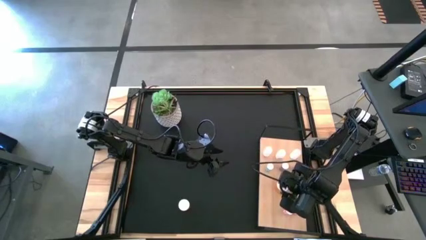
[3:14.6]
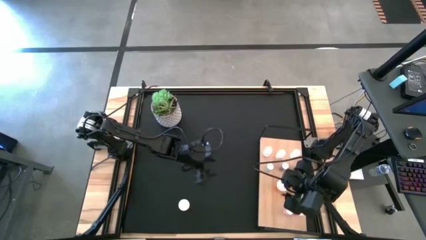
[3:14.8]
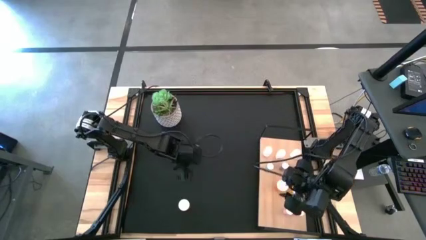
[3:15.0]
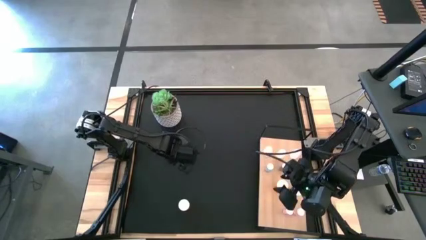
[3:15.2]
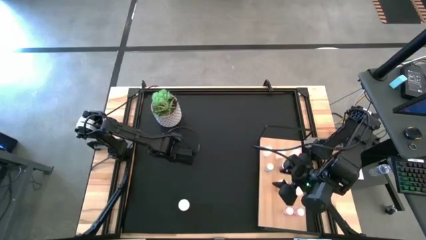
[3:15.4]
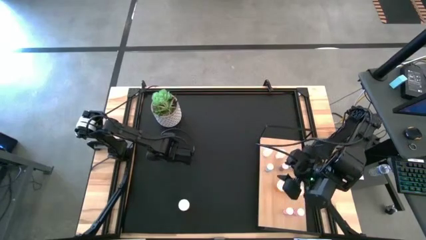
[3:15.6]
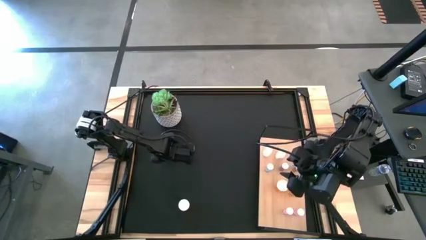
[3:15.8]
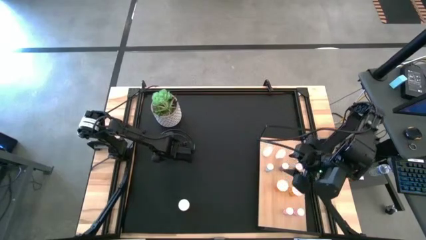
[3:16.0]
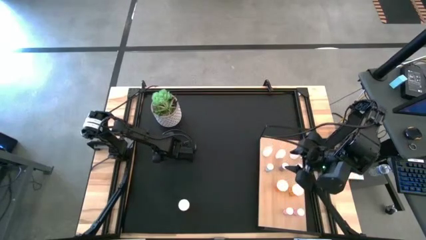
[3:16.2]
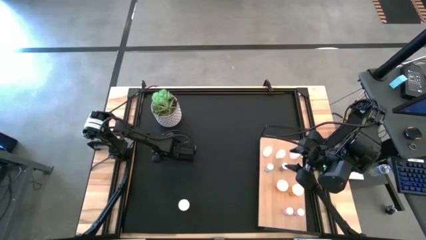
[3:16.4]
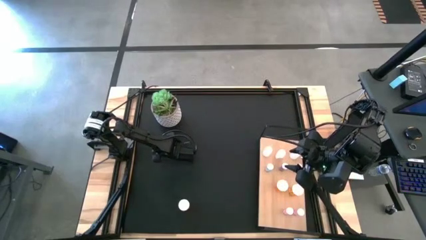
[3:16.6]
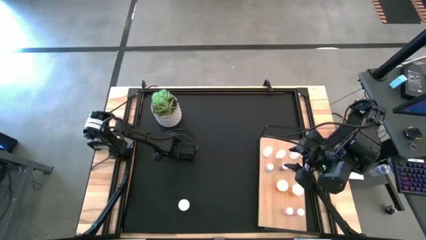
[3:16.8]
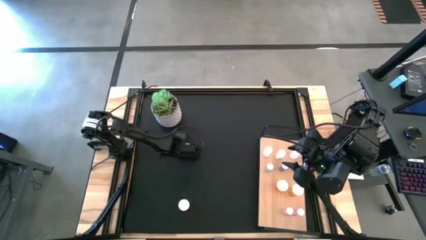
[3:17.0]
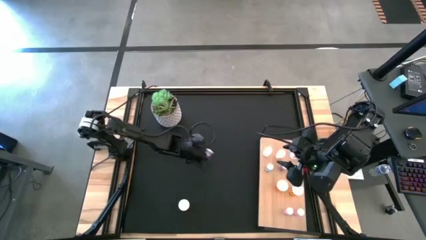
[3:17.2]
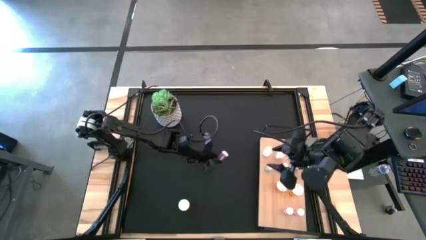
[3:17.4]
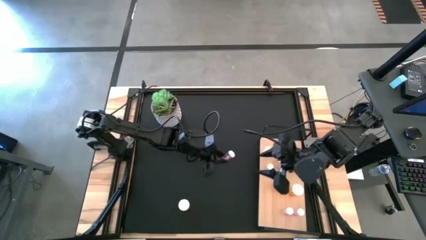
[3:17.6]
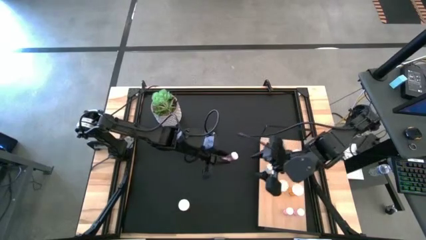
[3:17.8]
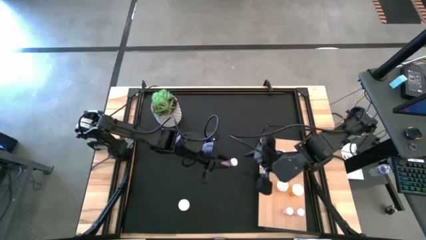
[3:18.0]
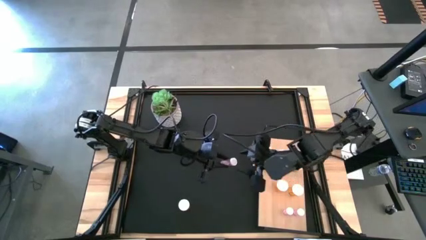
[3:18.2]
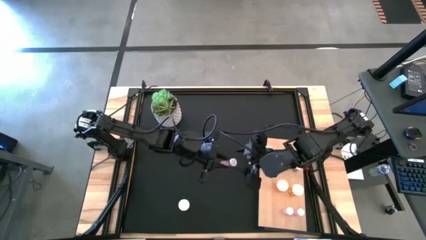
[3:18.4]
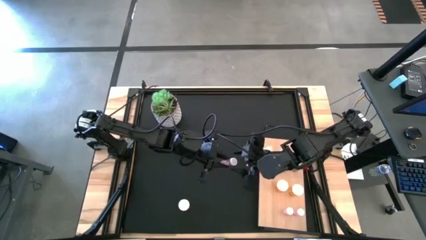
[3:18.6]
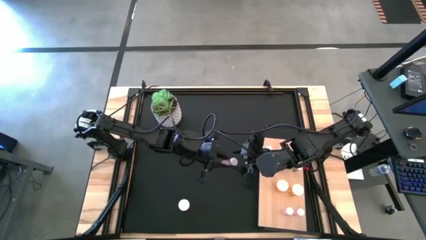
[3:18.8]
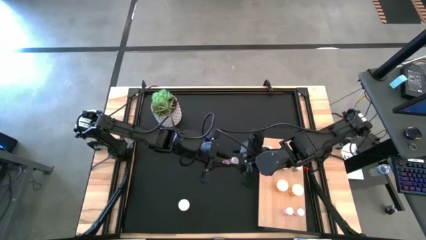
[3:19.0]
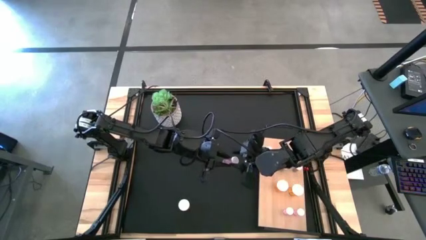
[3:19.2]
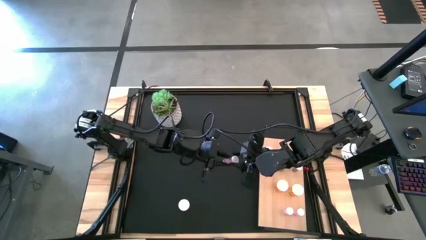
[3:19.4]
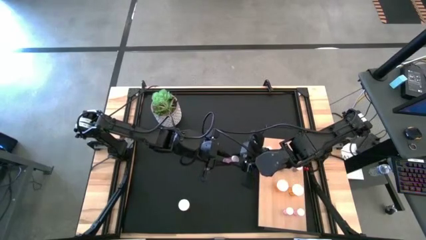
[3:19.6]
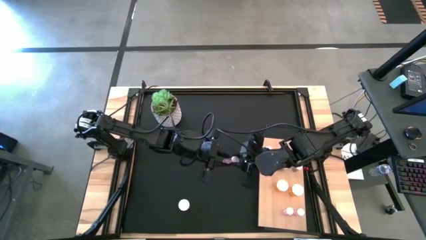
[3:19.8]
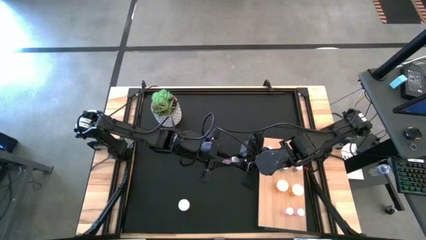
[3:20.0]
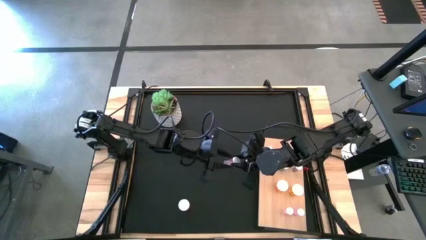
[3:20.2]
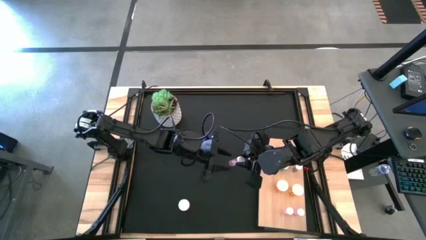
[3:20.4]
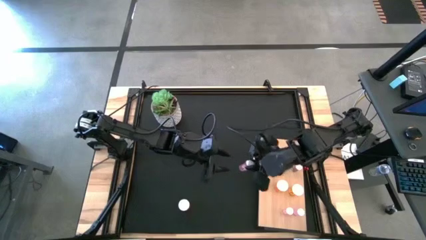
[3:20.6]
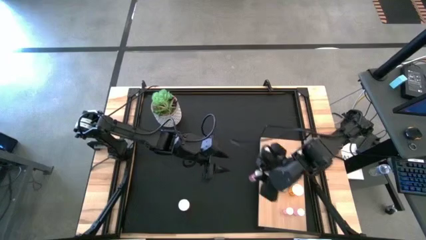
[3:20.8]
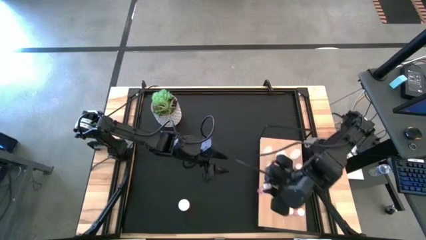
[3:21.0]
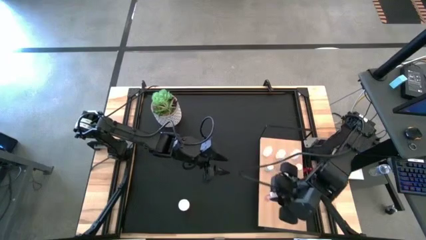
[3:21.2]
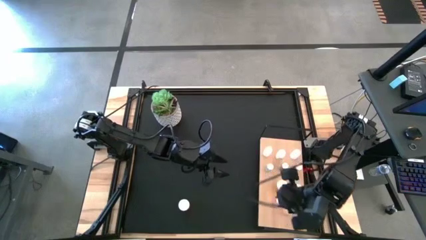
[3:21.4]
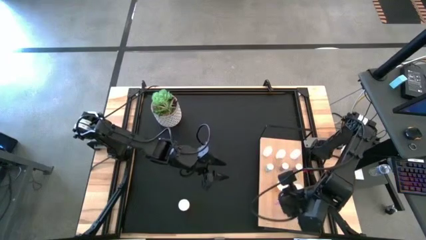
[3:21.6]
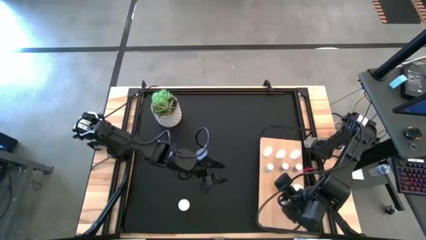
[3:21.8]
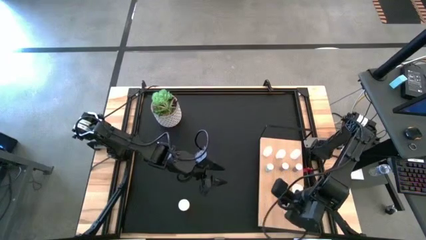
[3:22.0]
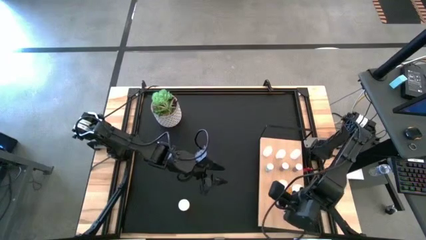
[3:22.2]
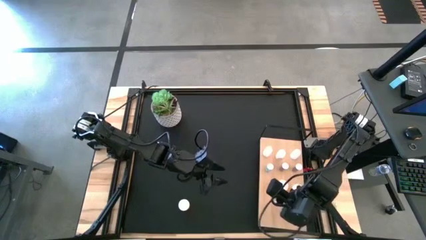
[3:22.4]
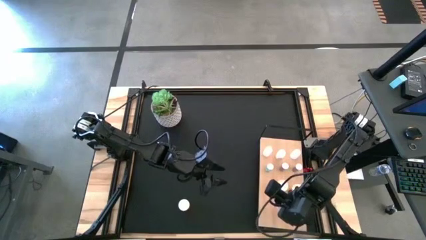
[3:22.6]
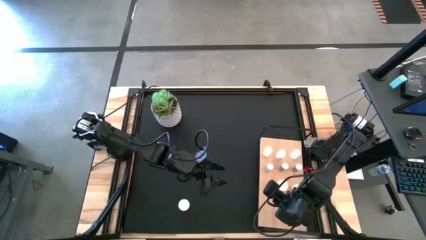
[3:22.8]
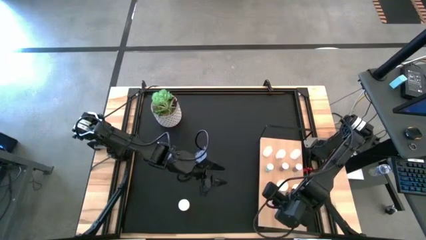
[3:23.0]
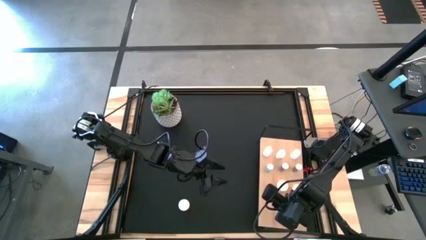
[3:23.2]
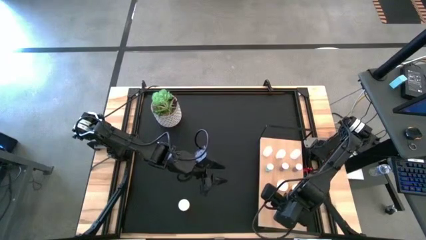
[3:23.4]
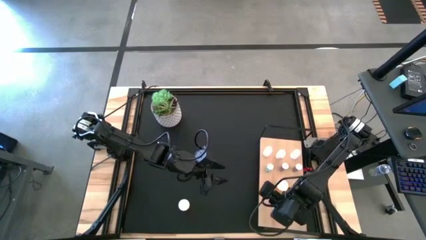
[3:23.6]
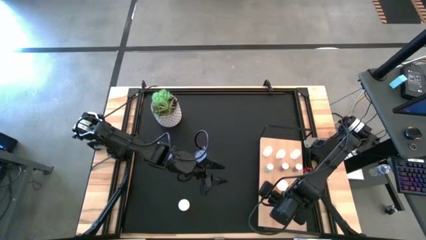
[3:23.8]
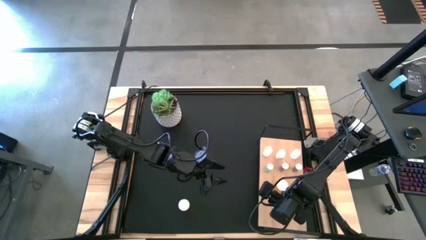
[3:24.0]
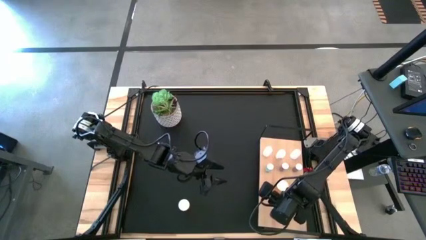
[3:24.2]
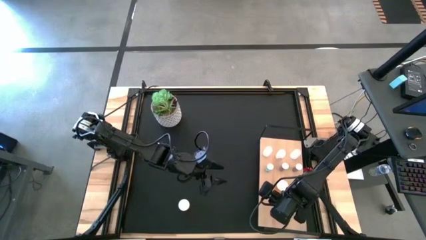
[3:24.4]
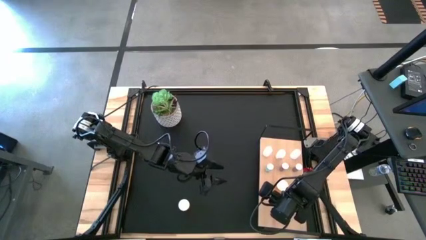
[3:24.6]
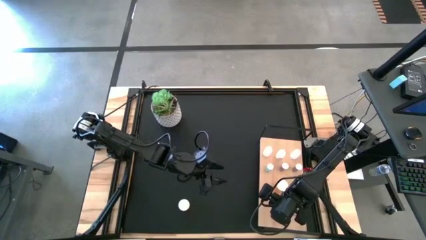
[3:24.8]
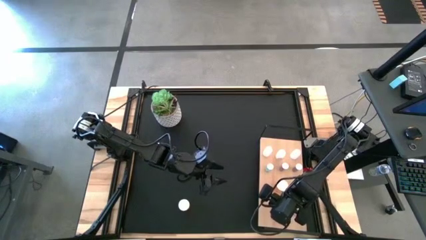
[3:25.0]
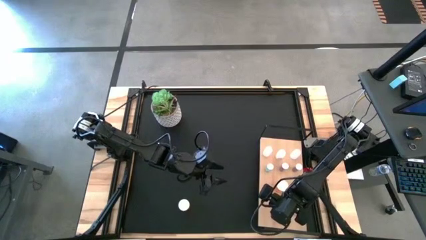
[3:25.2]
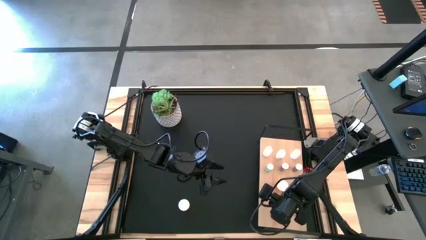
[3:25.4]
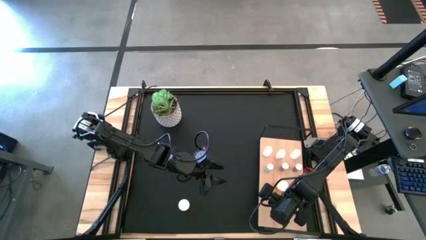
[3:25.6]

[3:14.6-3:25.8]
Task: Pick and place medicine bottles onto shelf by color
Put the pink pill bottle on the shelf aligned with the other pink pill bottles

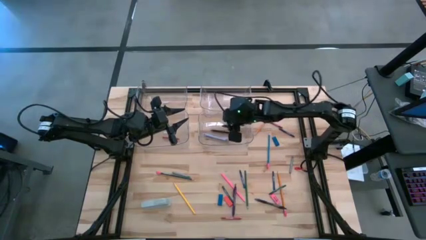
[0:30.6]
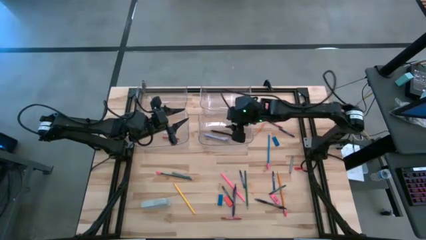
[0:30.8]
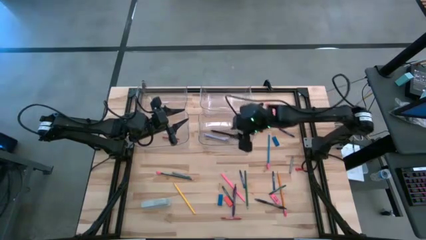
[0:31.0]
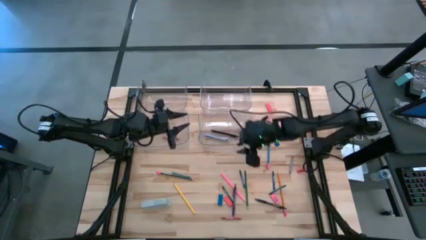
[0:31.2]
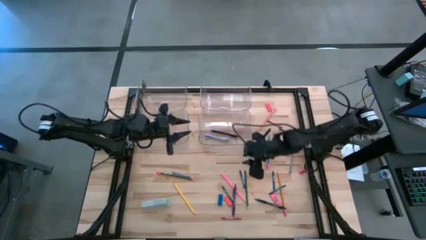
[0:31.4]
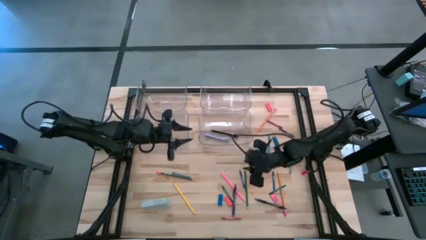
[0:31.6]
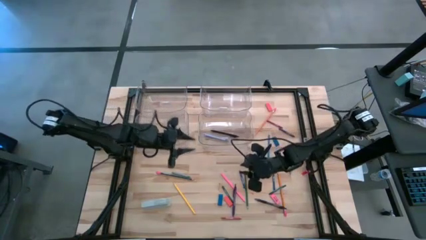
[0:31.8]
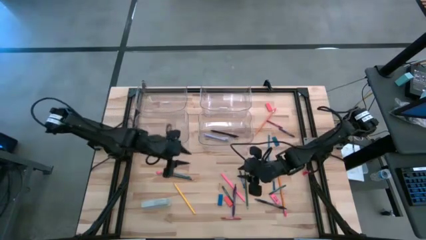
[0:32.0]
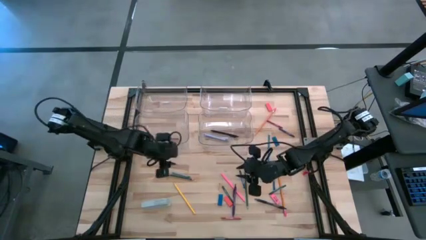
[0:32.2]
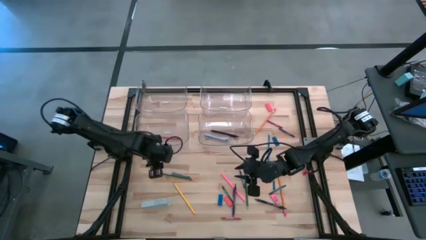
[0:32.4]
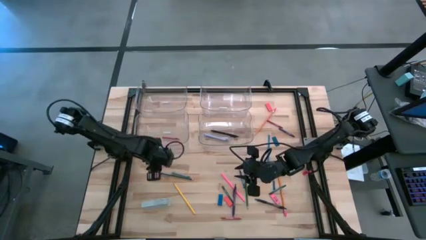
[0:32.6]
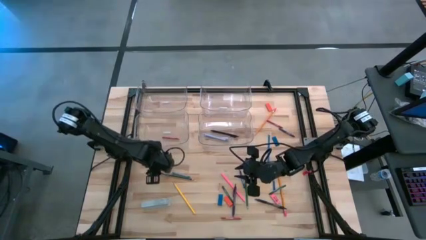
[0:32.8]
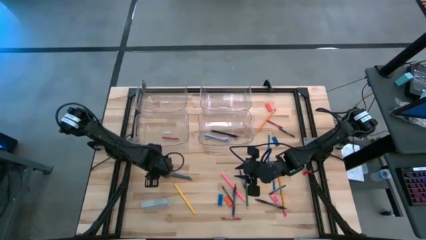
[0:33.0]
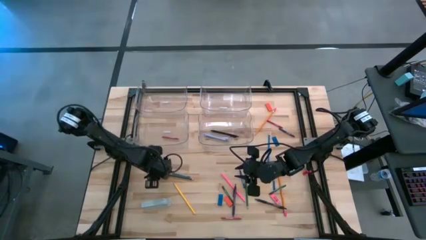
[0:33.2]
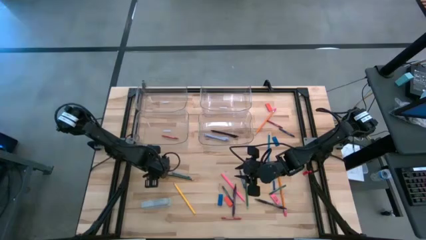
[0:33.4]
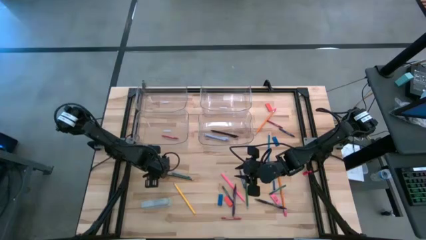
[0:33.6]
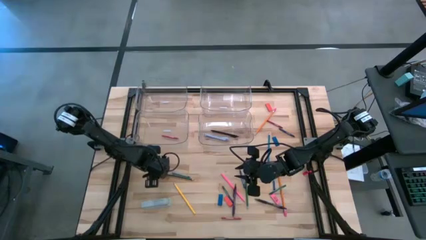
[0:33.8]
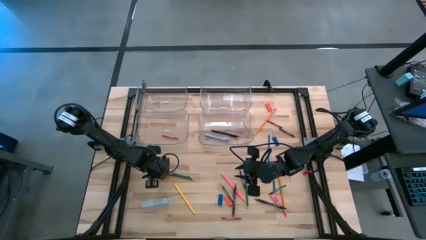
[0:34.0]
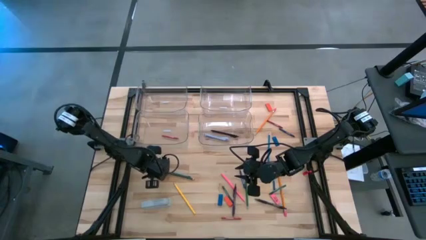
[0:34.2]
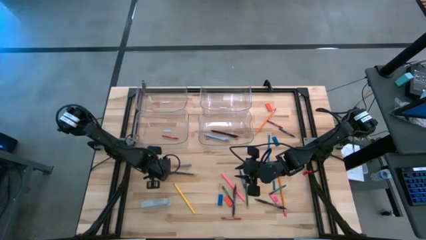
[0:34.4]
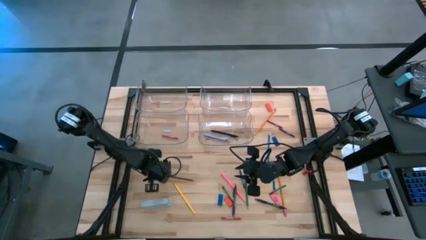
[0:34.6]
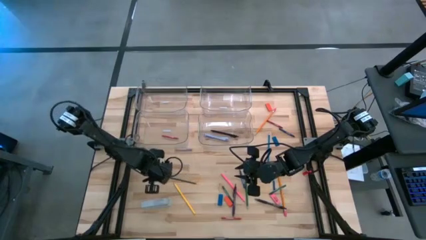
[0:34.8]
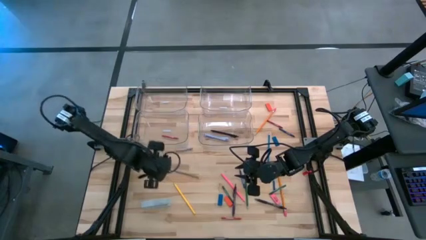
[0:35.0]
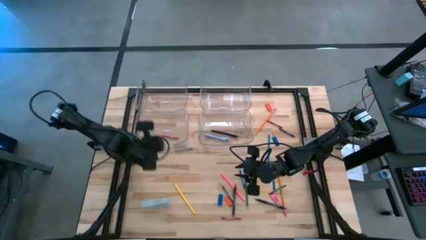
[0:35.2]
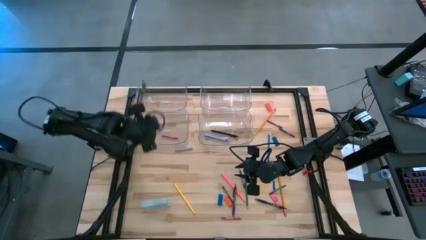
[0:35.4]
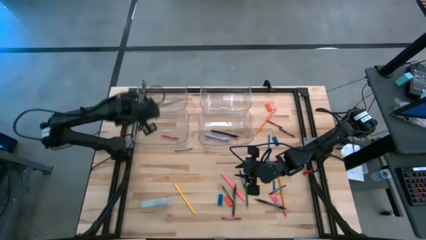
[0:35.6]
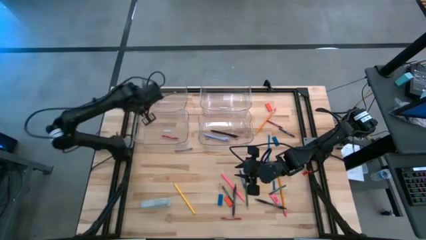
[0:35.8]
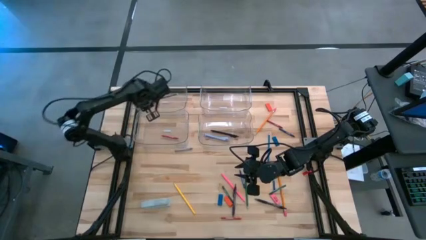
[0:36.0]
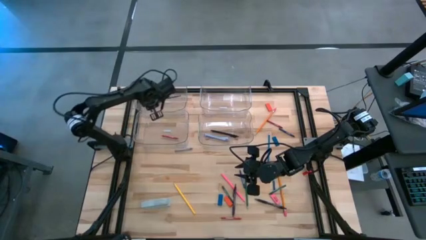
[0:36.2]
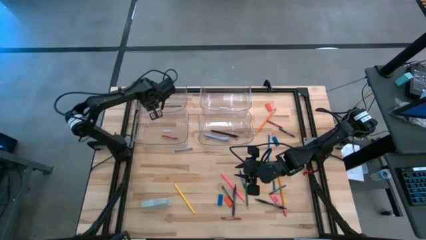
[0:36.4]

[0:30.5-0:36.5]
Task: Sort crayons/erasers/pens/pencils in bins
Put the left green pencil into the top left transparent bin
